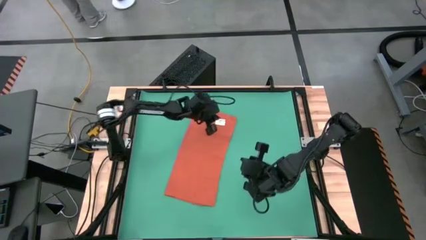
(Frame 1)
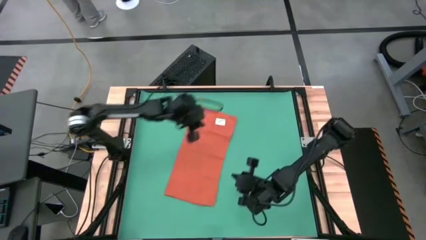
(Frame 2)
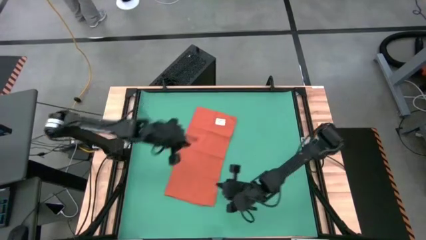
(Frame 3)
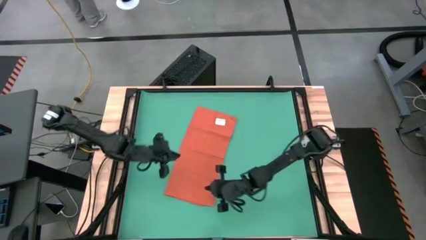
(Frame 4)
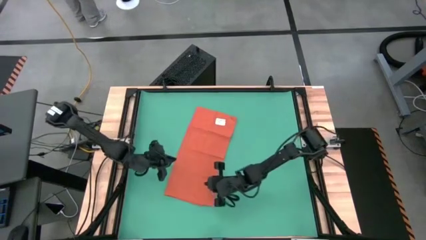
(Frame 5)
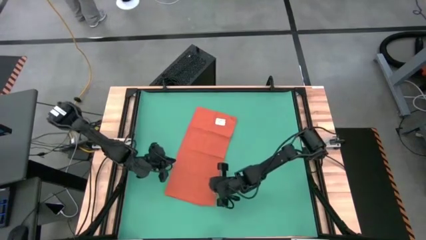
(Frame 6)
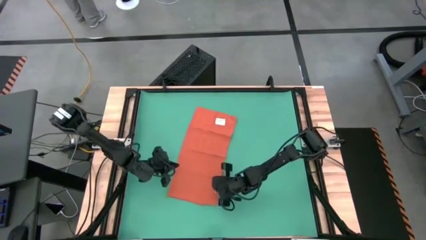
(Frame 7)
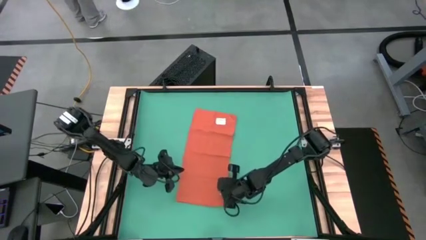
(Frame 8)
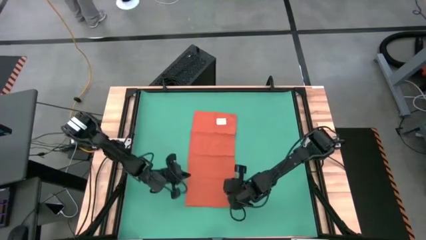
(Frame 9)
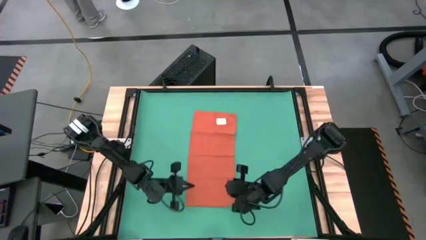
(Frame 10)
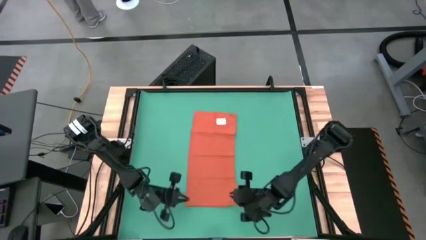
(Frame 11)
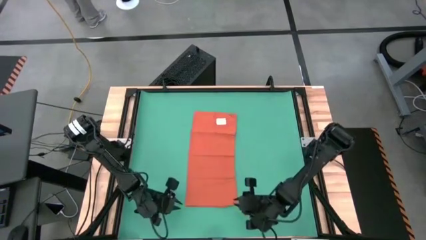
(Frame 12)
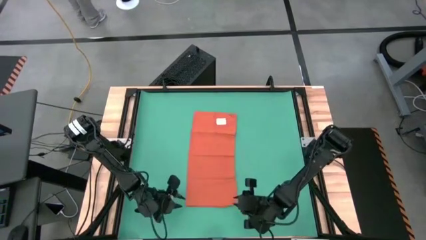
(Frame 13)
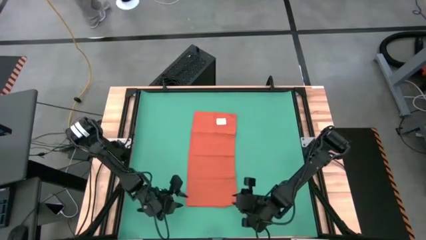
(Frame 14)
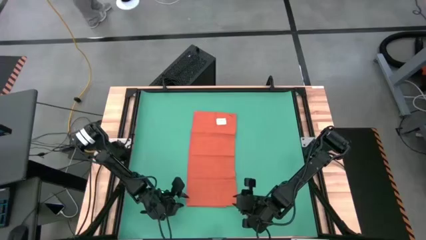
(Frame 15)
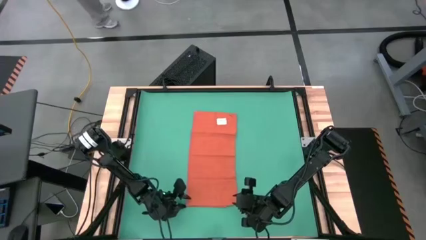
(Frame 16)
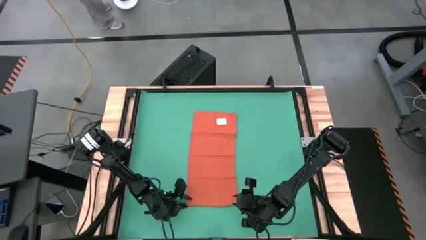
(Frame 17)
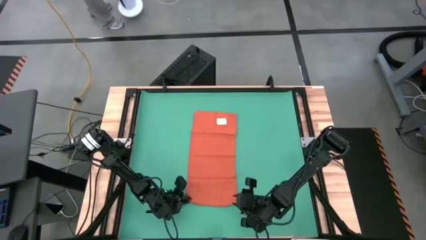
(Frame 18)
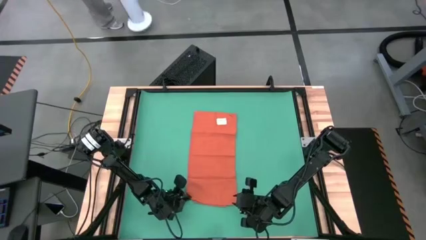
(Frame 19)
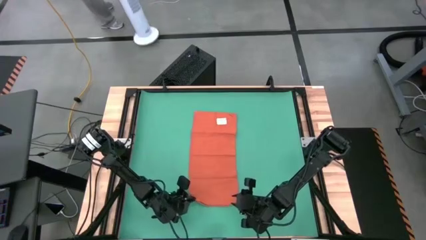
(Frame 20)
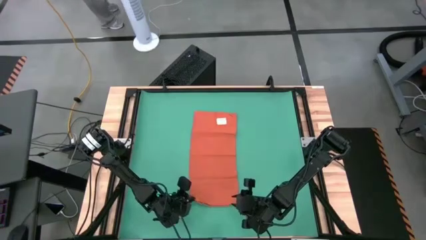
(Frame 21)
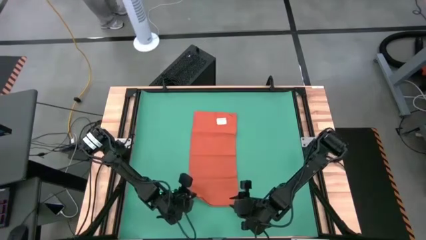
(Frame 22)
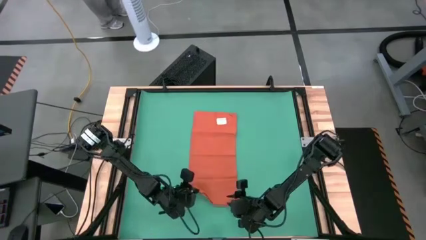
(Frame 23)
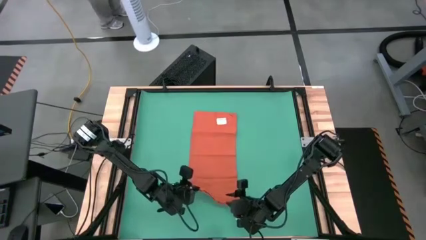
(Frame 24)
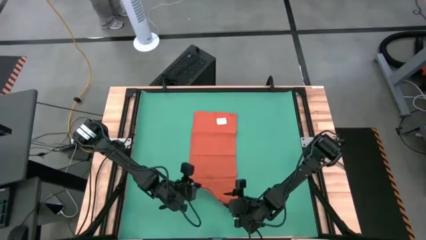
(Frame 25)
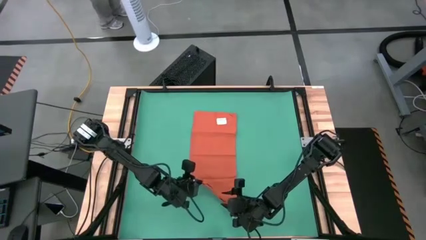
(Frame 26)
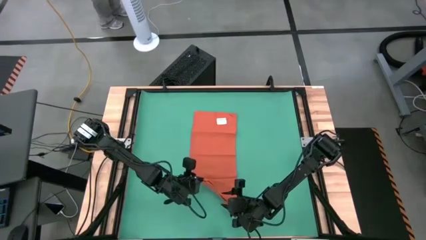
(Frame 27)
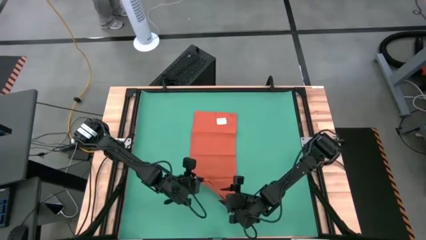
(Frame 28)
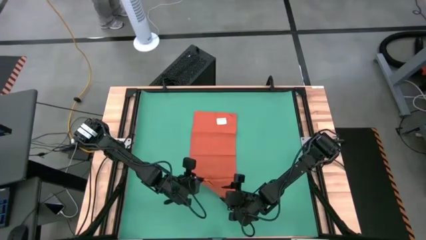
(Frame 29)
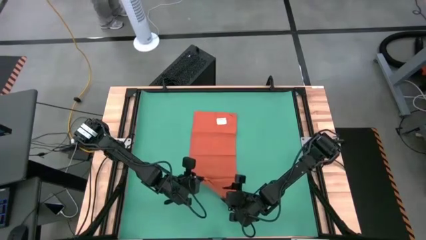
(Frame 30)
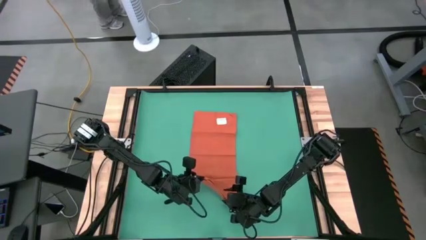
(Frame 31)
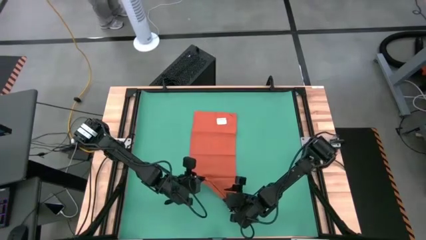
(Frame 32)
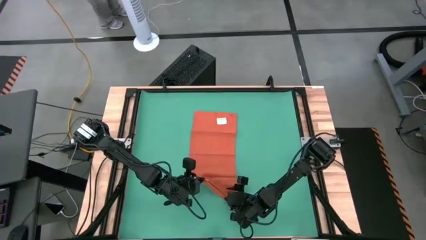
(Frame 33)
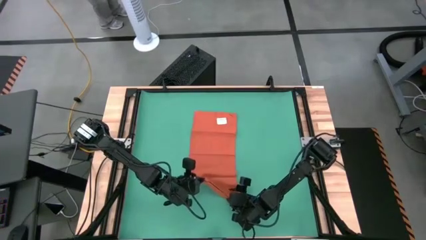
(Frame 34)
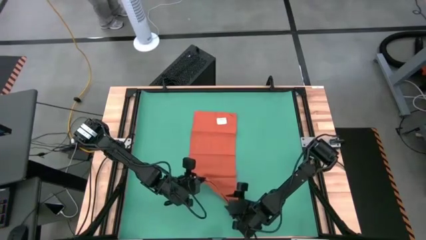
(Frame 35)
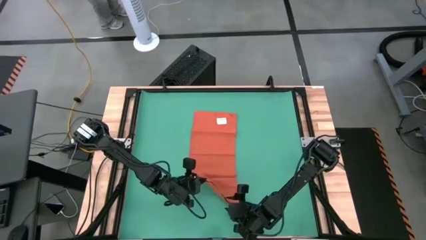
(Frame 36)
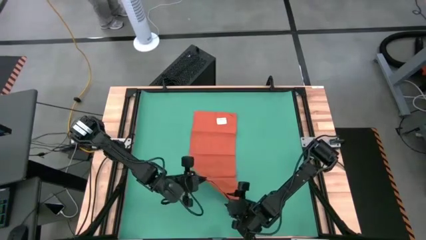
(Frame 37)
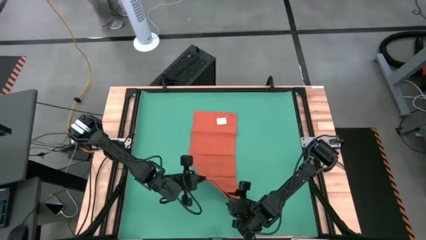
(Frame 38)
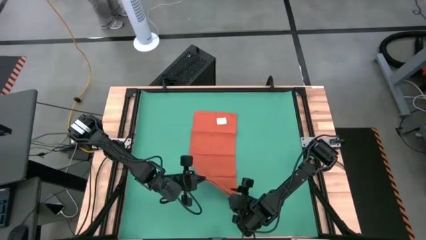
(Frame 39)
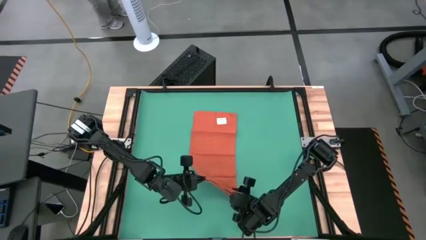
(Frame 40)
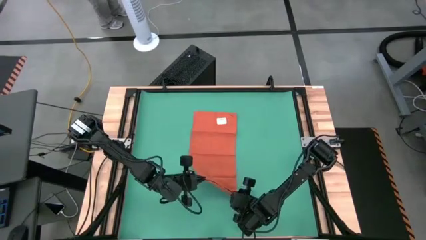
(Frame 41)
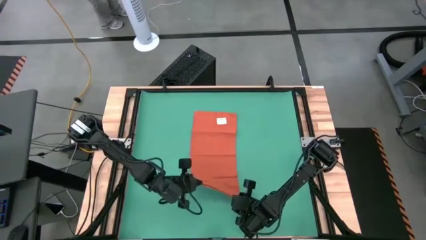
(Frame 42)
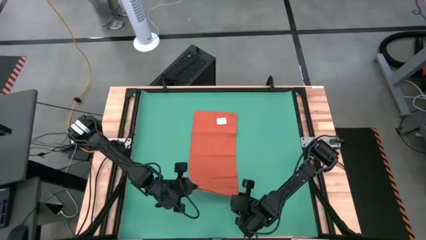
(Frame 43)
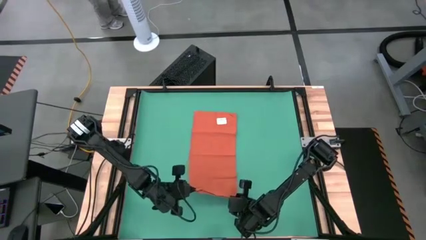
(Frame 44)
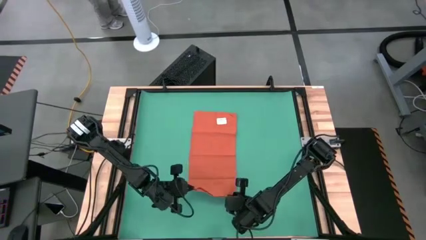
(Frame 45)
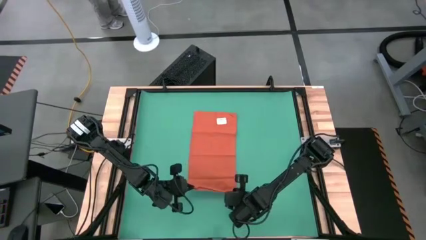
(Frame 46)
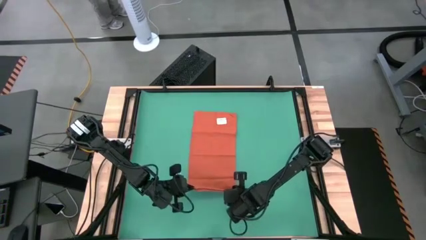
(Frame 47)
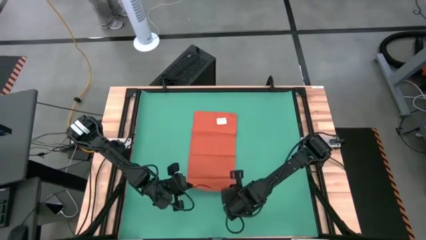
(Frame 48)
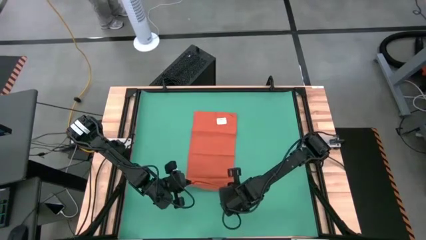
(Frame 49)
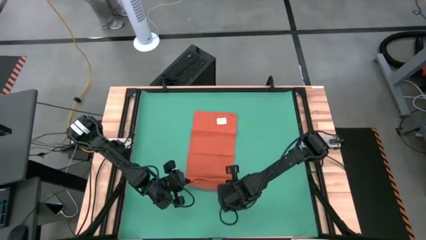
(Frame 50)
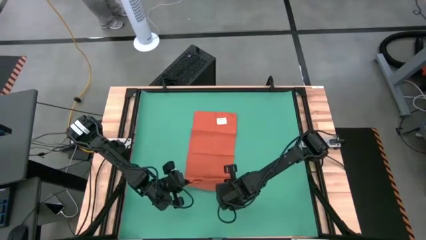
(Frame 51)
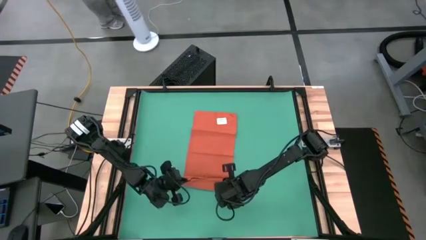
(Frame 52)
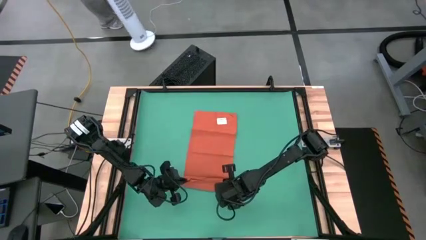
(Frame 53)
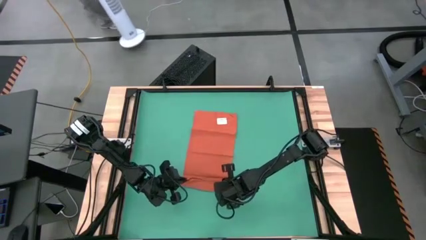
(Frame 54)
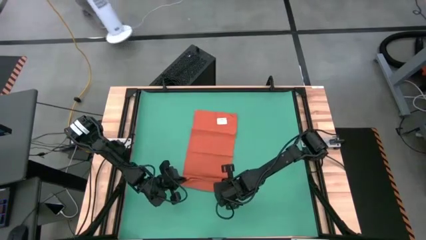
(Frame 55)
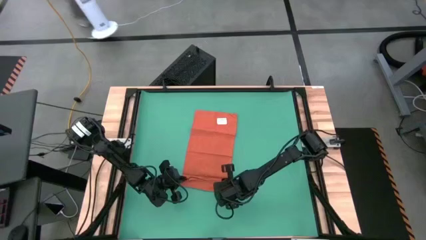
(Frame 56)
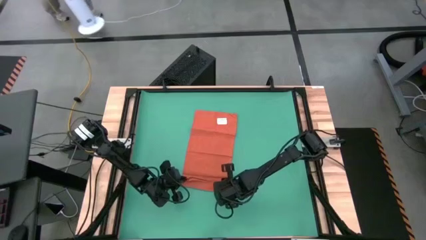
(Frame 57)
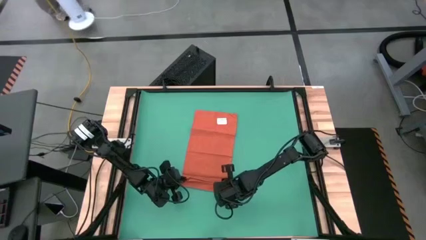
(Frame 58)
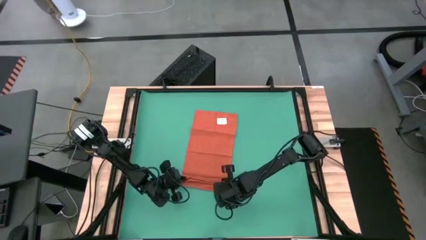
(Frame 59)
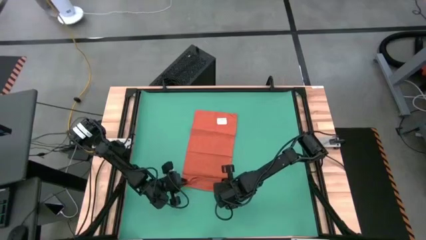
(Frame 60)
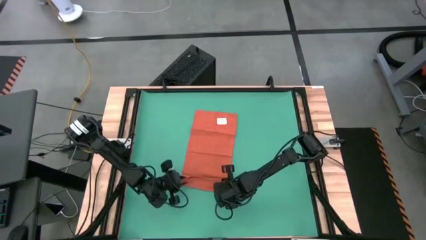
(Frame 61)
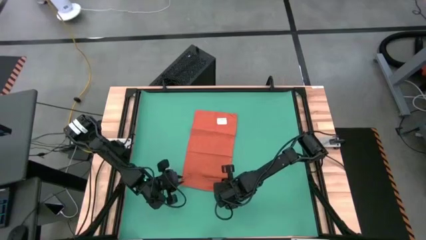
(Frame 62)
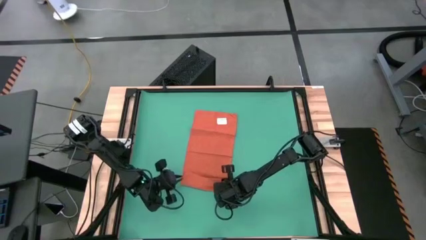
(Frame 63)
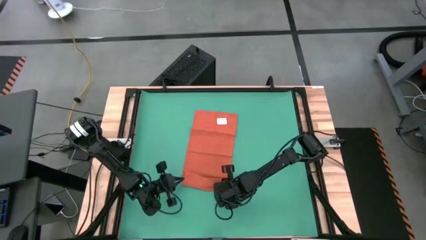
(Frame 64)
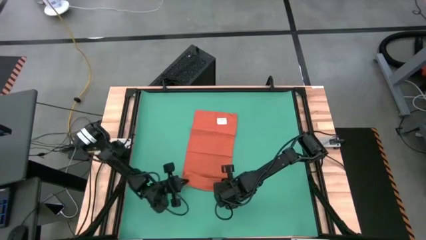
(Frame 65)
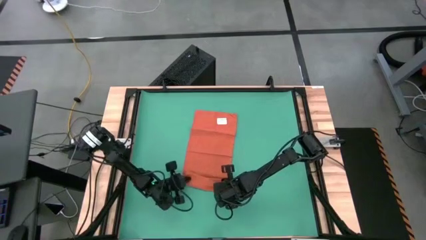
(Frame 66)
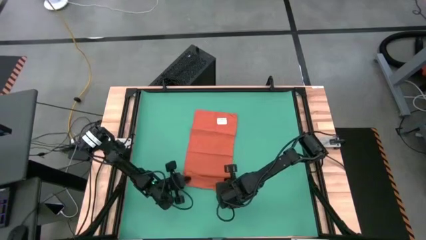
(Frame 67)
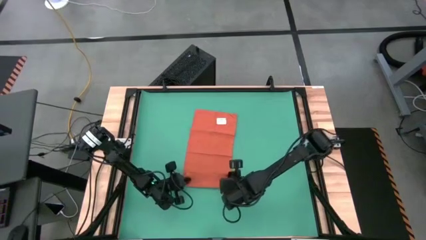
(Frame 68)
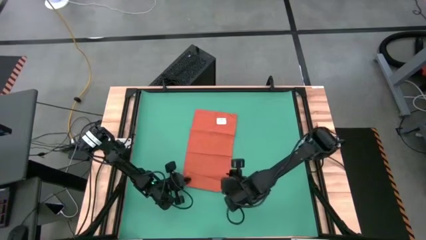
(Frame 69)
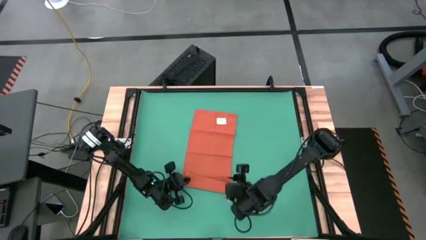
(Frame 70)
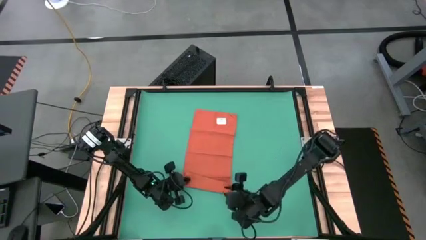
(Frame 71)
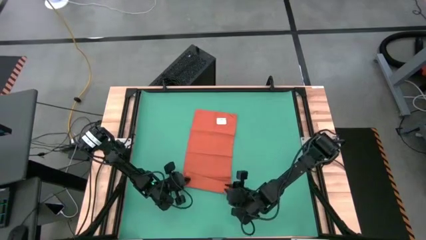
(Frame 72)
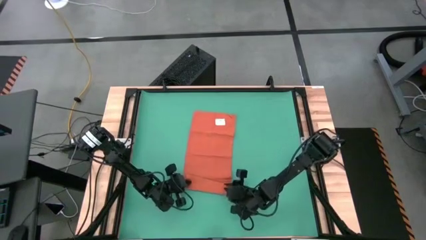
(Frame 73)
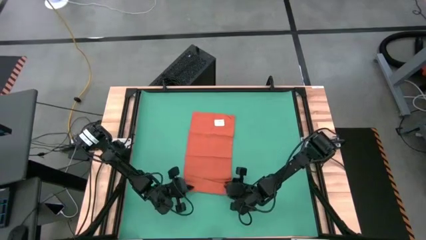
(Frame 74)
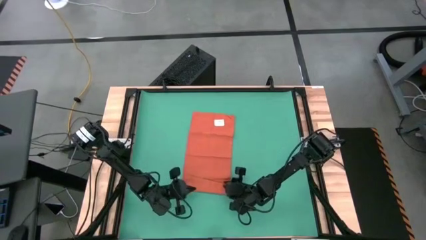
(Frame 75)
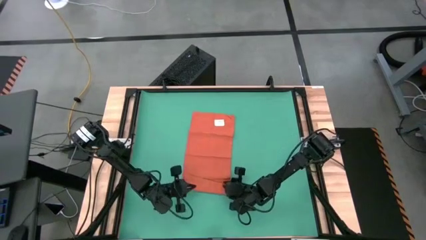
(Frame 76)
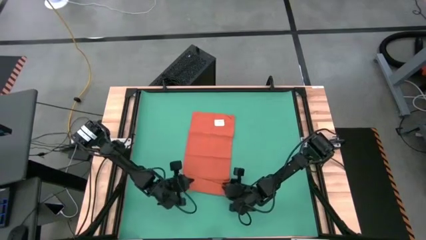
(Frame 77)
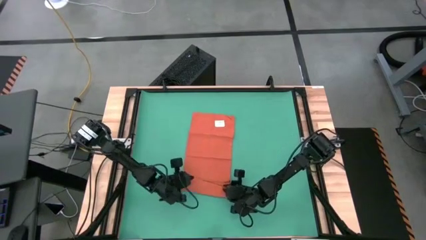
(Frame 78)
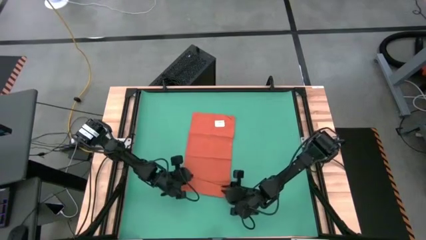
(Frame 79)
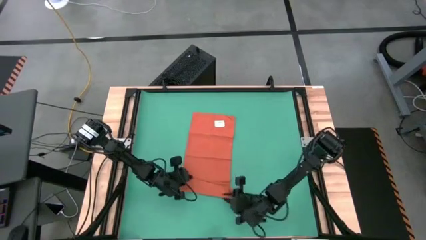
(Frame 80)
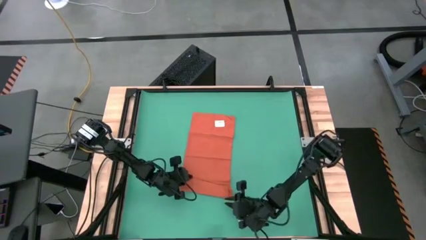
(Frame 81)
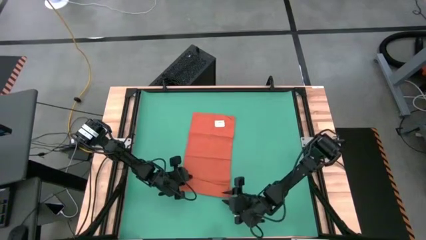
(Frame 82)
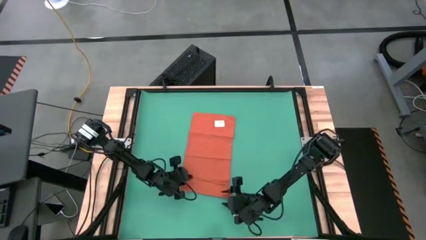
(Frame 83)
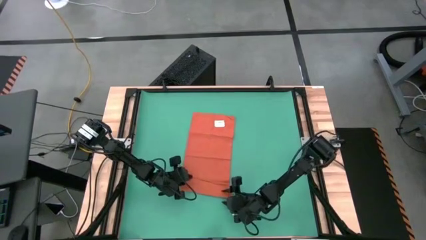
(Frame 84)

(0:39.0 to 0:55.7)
Task: Roll towel
Roll the orange towel
